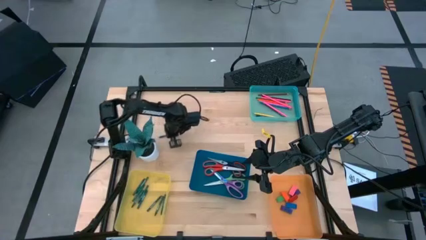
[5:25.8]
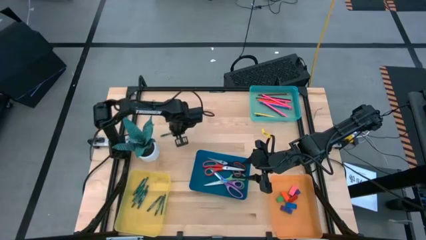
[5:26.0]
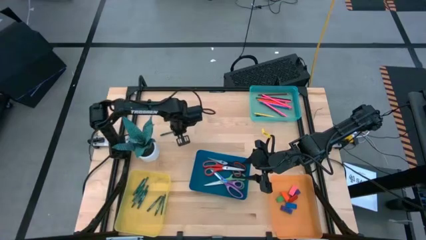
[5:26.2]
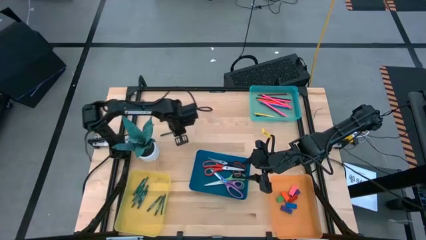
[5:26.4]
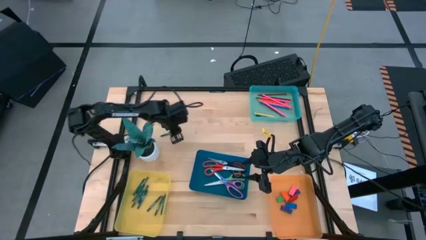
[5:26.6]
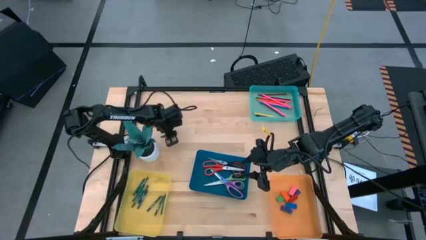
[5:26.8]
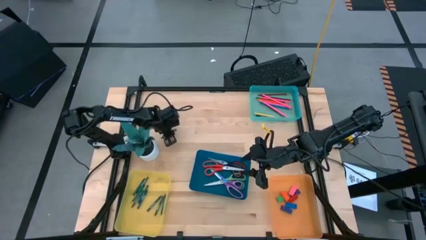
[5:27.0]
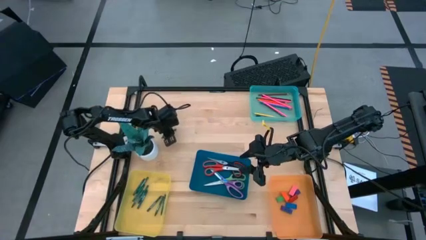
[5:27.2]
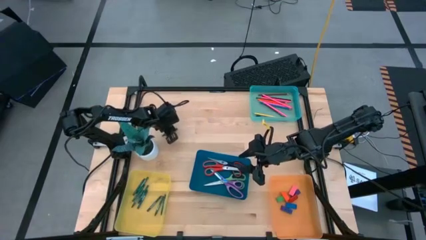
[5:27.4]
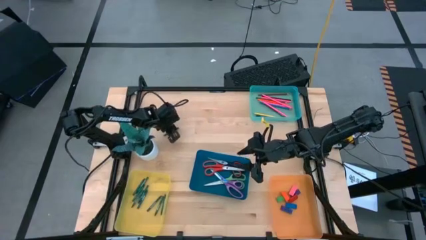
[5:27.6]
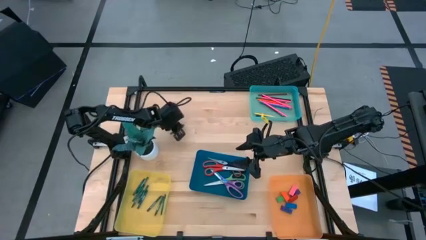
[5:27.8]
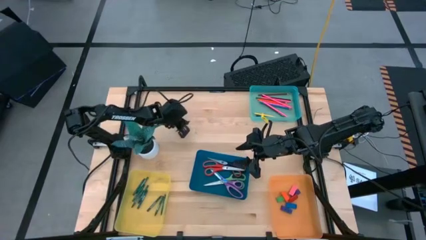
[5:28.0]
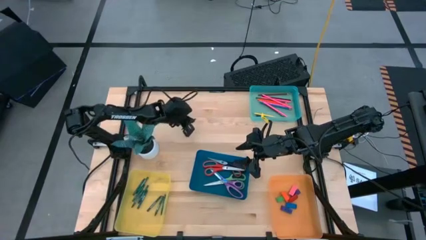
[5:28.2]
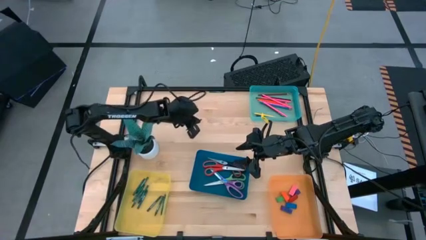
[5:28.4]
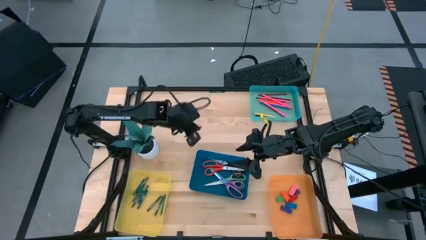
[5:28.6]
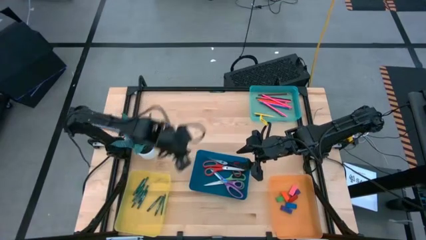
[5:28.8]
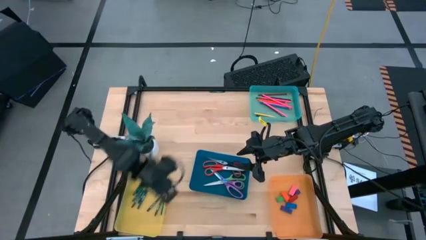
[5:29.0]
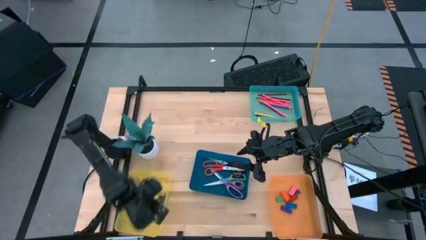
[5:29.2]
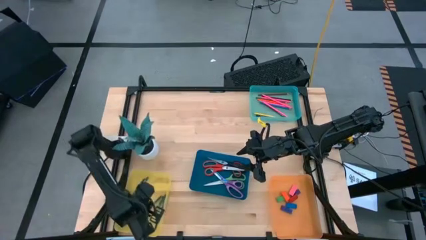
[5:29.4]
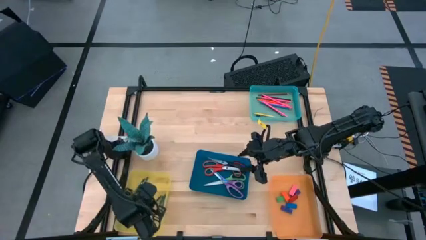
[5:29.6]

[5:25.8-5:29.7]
Task: Sort crayons/erasers/pens/pencils in bins
Put the green crayon into the yellow bin

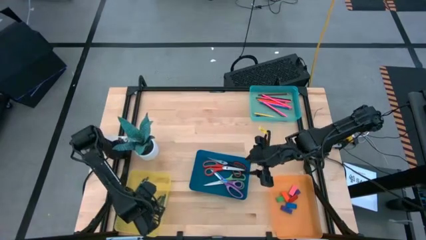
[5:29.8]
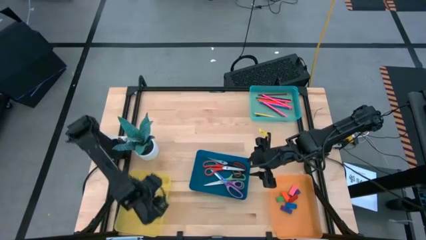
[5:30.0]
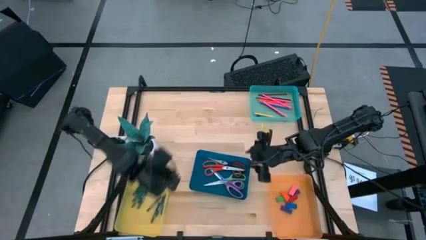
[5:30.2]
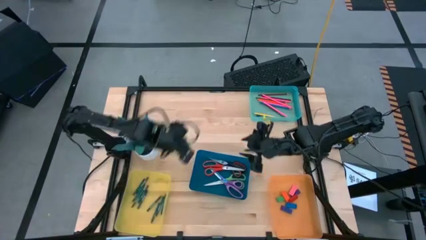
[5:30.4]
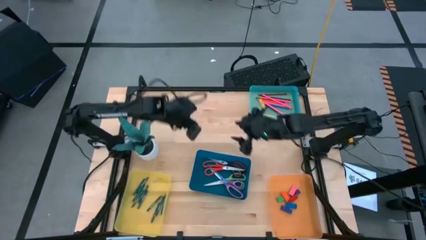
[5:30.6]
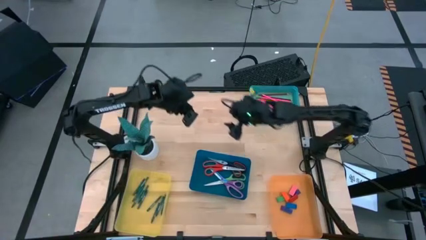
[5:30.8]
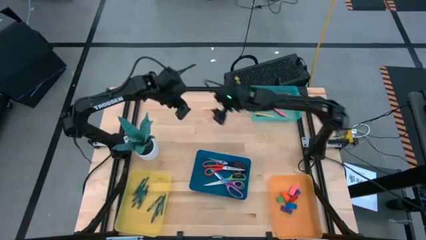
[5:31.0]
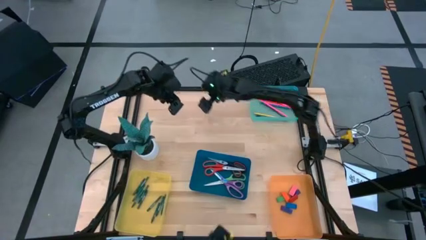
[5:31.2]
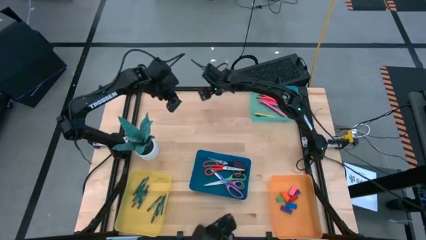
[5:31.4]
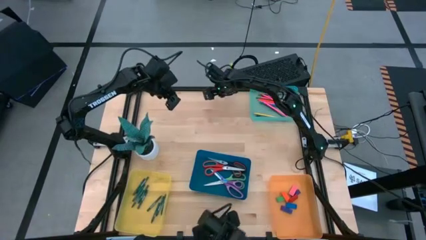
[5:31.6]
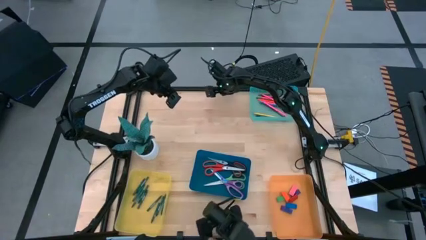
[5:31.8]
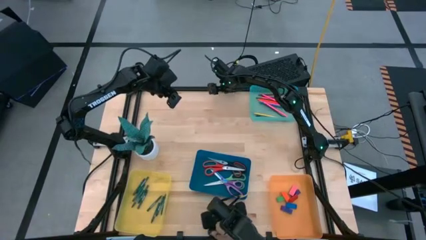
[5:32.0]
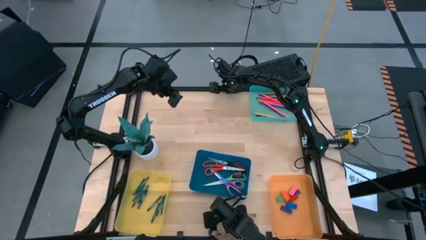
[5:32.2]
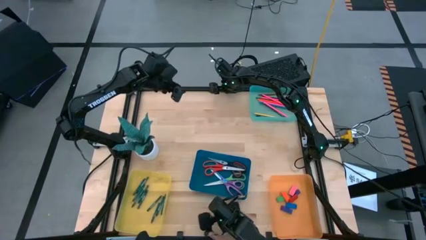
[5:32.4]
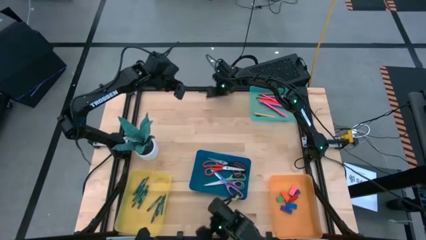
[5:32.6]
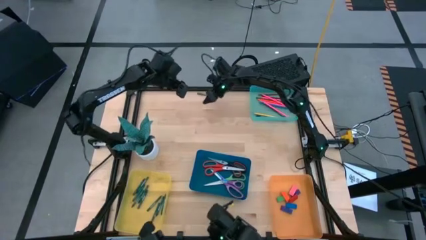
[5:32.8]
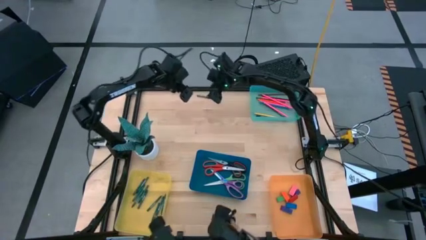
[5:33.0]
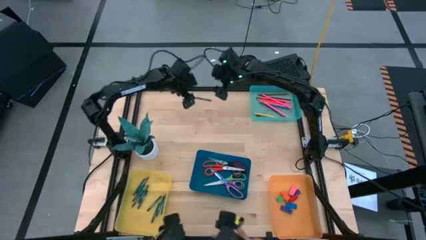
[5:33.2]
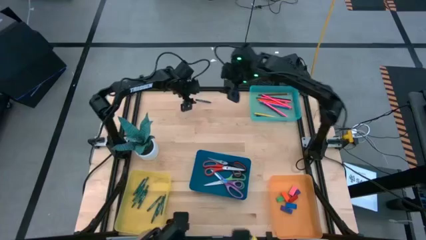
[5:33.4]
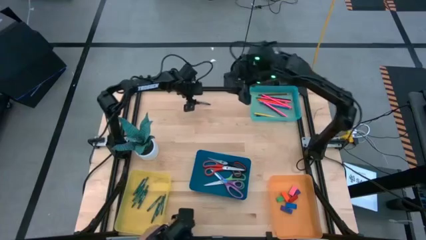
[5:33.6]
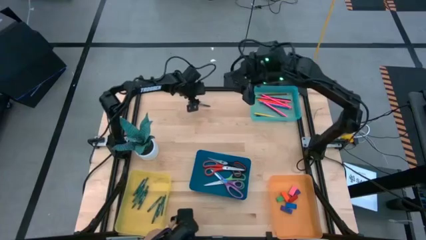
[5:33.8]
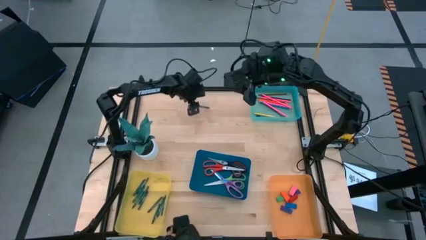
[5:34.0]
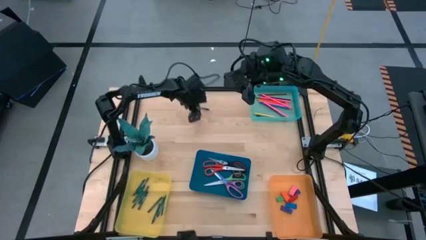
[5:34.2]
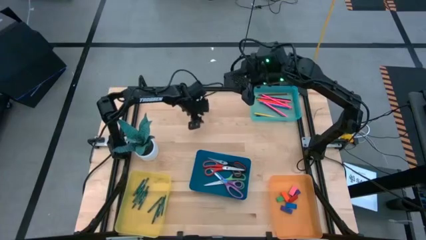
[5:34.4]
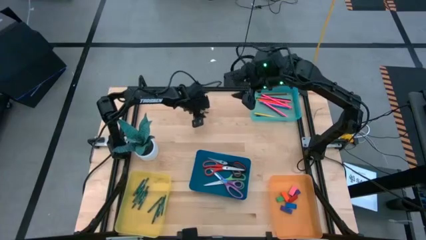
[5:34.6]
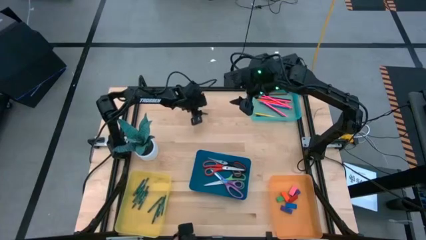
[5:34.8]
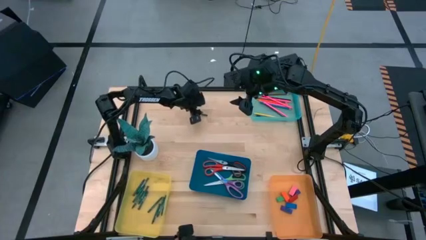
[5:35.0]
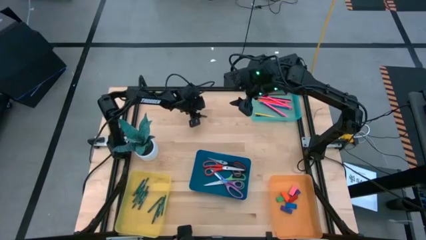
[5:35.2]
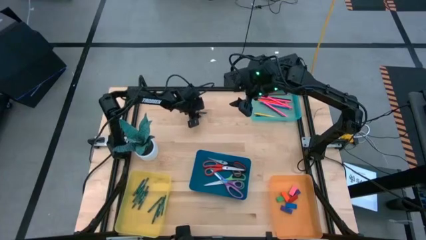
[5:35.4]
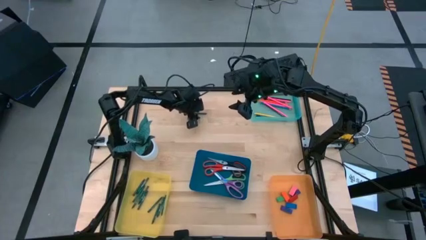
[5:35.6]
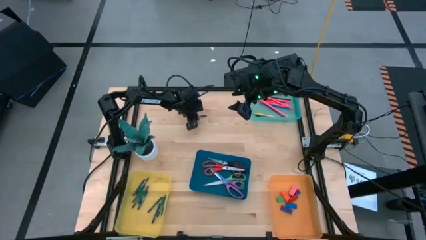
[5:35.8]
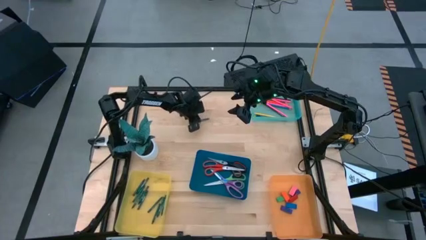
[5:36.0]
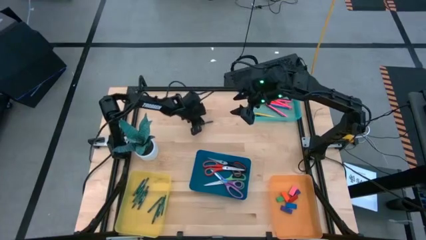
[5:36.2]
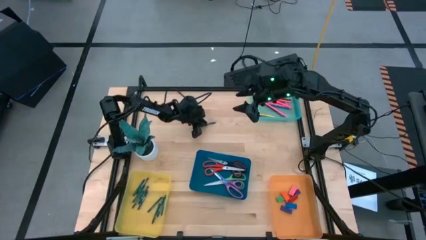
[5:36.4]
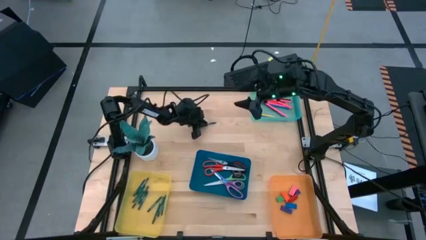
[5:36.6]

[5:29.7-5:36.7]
Put the green crayon into the yellow bin

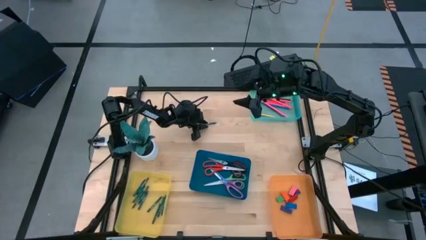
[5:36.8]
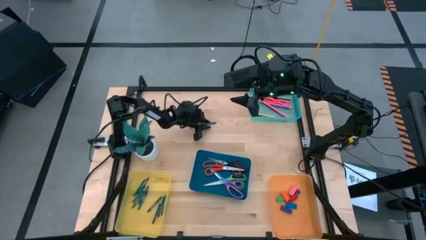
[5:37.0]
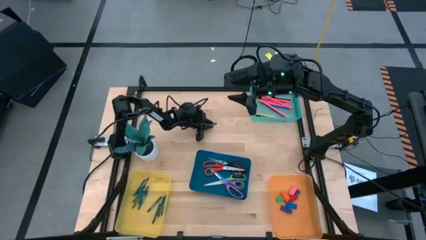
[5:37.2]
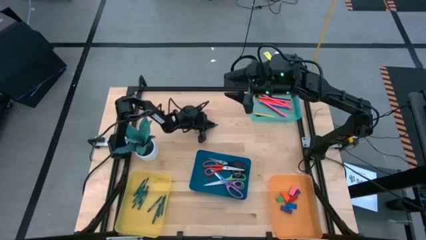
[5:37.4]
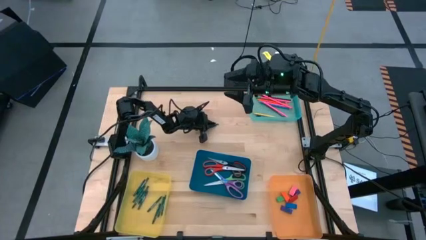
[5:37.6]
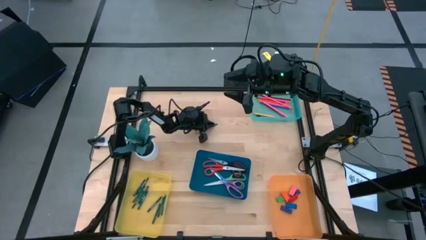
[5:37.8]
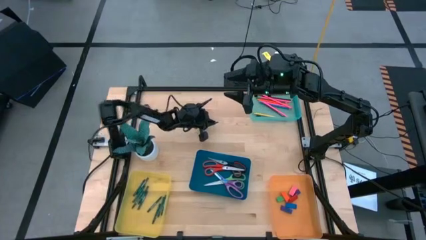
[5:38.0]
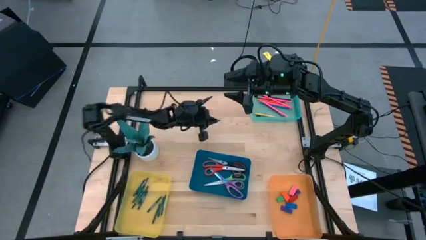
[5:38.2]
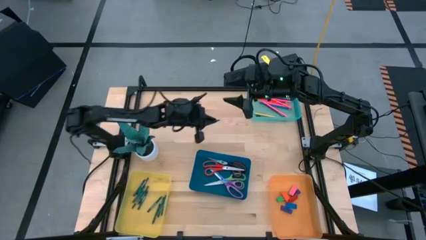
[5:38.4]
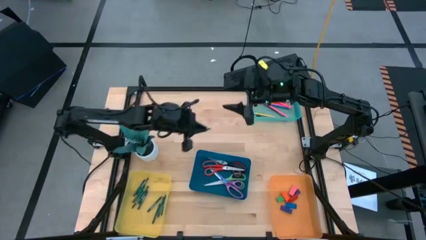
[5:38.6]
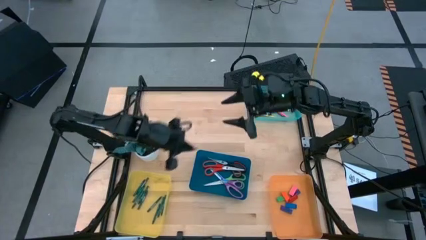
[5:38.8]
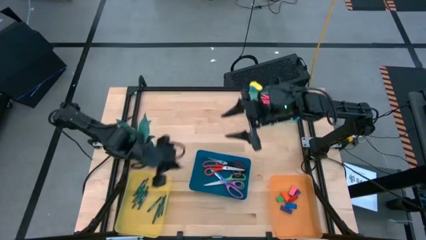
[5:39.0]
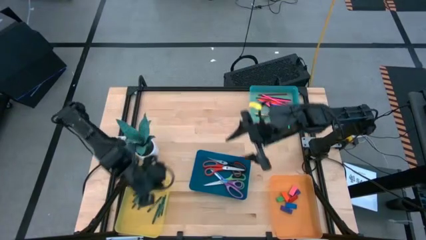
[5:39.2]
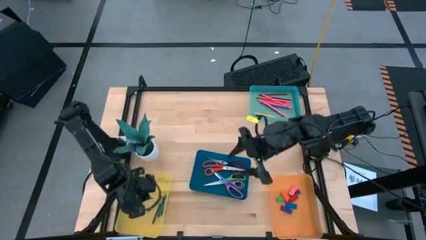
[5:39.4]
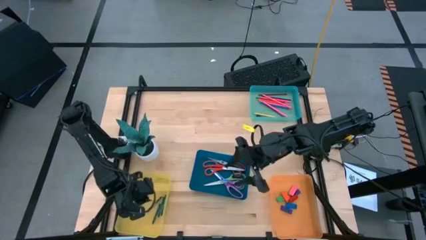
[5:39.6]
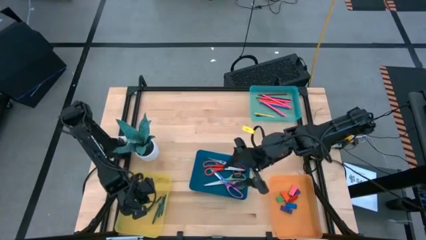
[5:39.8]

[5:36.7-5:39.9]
Put the green crayon into the yellow bin

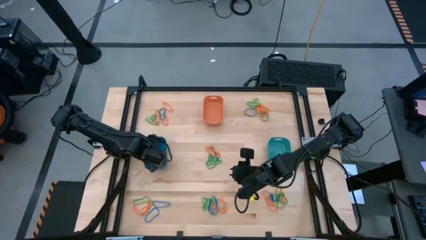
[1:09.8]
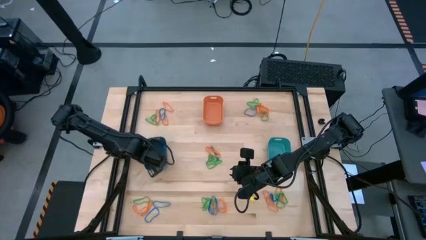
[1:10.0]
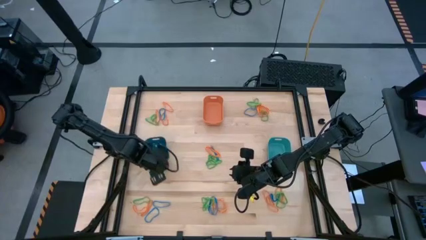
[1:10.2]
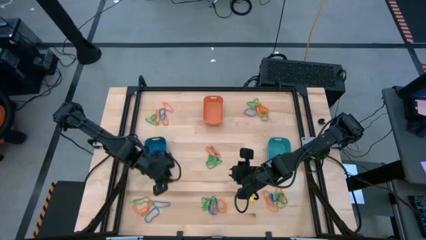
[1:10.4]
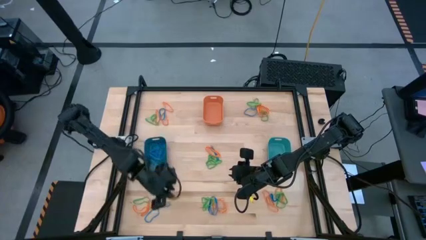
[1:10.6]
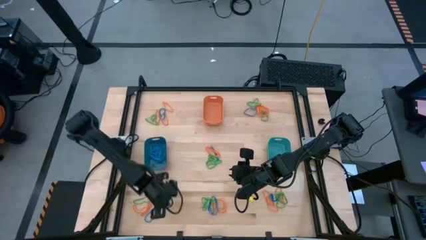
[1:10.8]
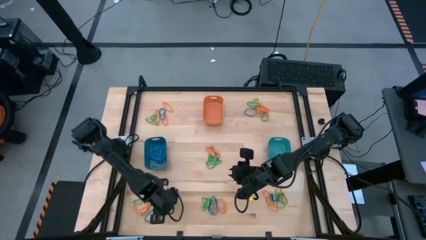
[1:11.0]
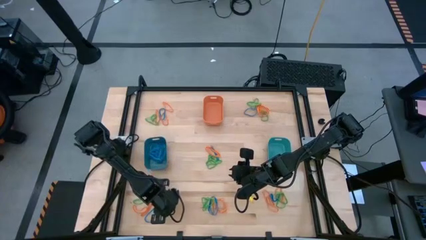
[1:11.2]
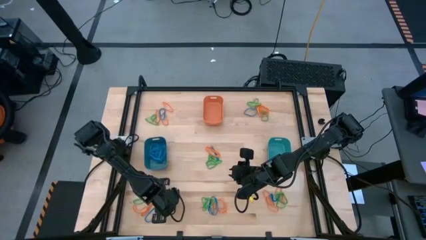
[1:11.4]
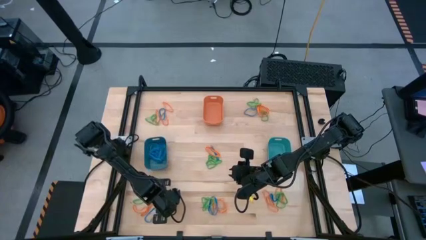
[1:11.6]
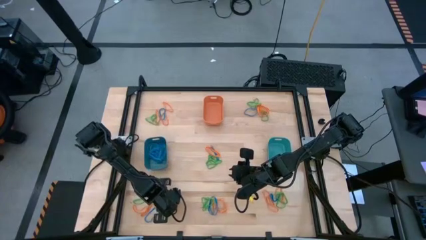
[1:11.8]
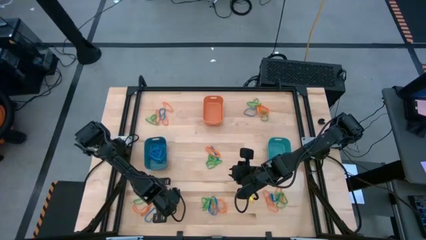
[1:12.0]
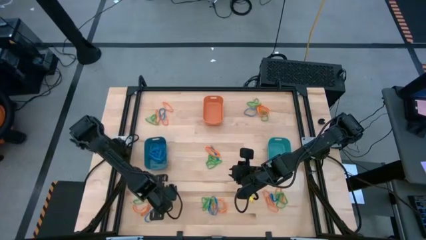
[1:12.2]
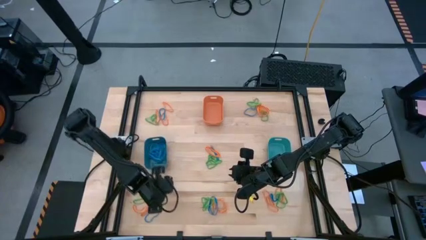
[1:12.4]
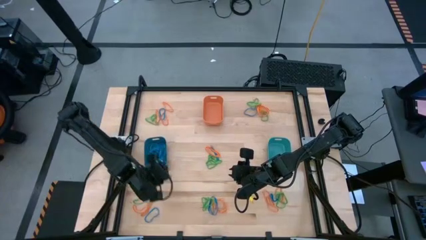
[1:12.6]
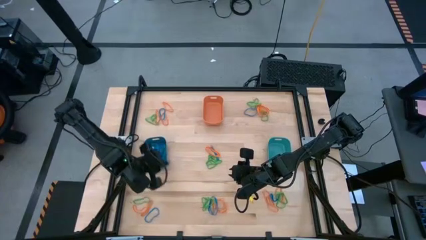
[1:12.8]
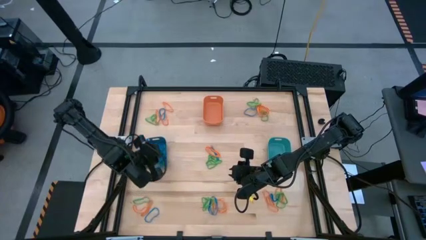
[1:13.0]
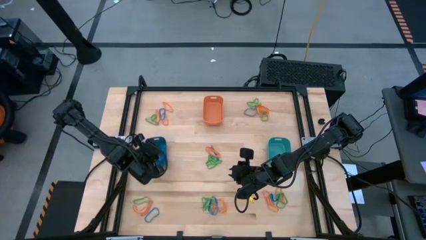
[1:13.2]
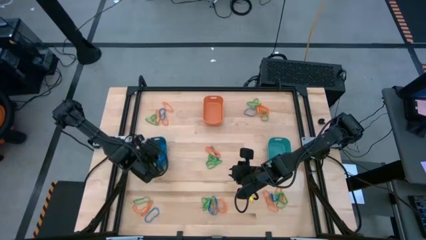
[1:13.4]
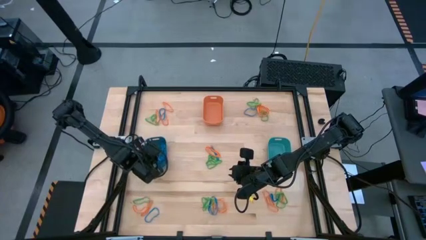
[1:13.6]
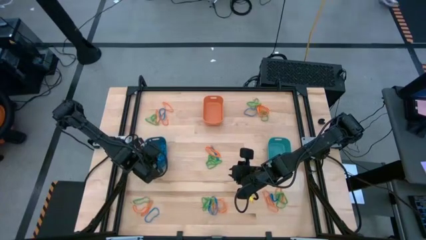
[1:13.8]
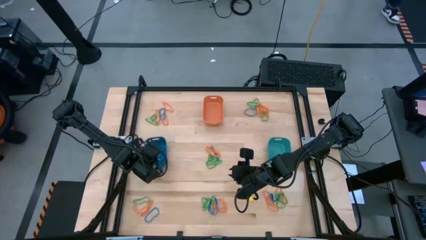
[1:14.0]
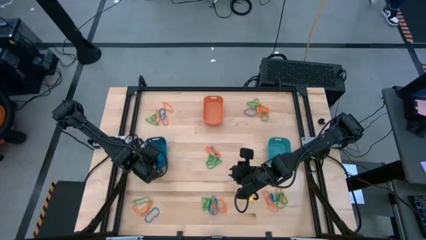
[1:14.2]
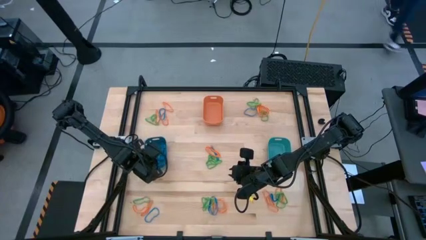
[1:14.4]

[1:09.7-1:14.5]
Task: Sort rubber bands into baskets
Put the blue rubber band into the blue bin
